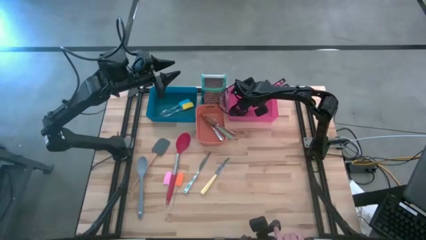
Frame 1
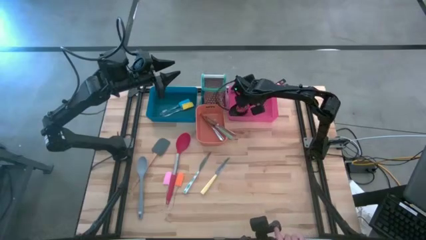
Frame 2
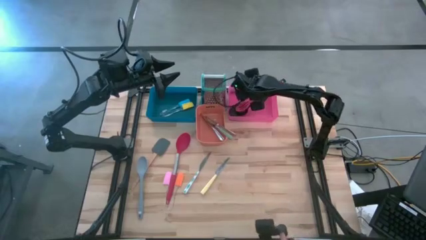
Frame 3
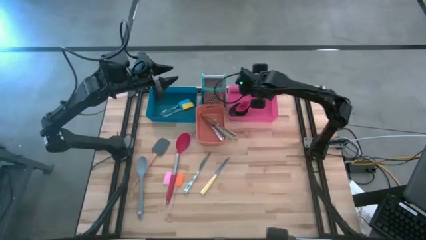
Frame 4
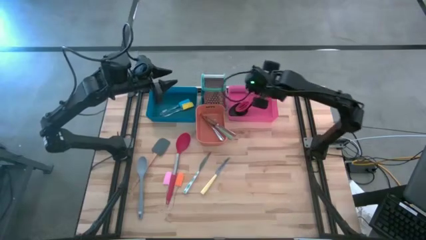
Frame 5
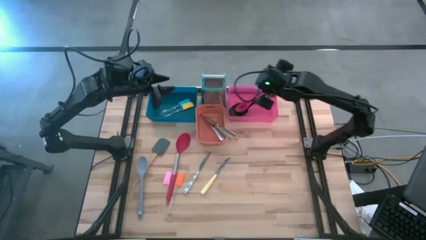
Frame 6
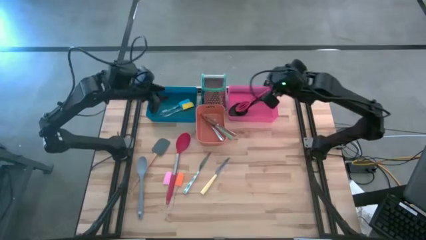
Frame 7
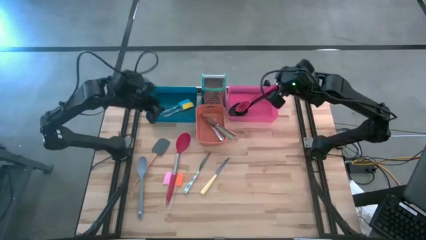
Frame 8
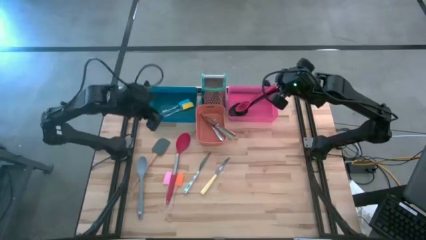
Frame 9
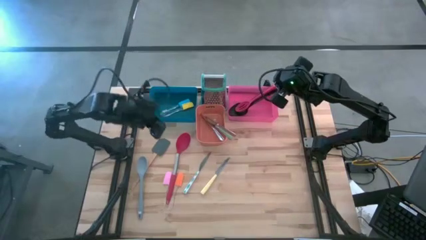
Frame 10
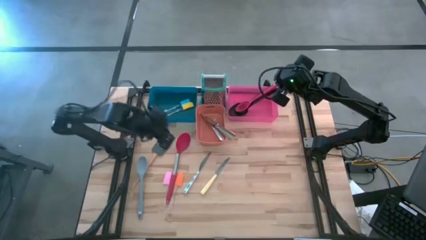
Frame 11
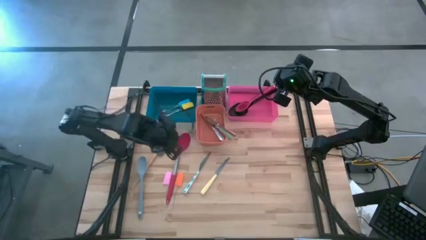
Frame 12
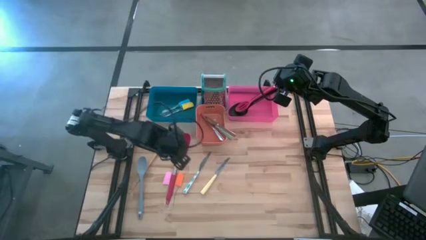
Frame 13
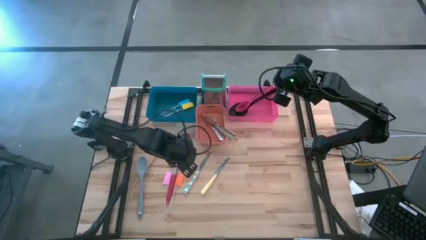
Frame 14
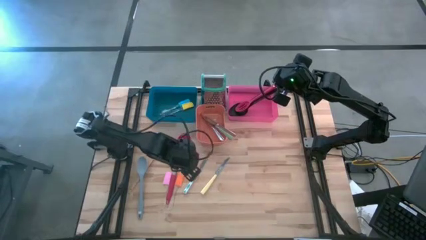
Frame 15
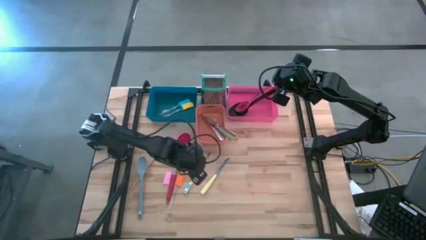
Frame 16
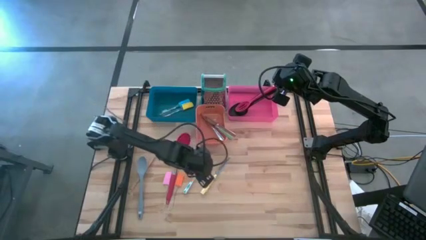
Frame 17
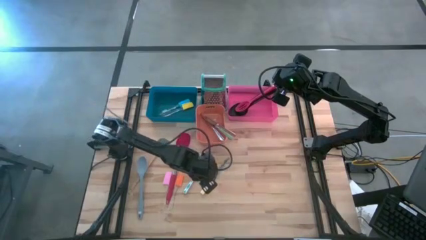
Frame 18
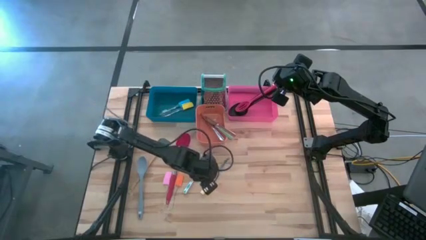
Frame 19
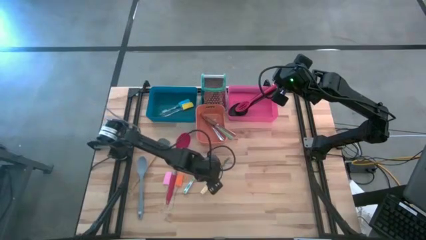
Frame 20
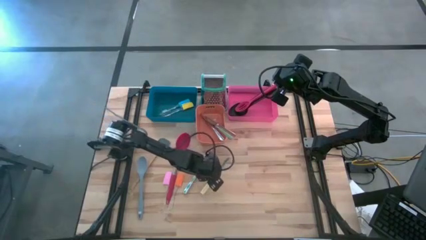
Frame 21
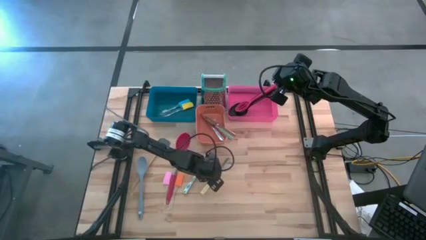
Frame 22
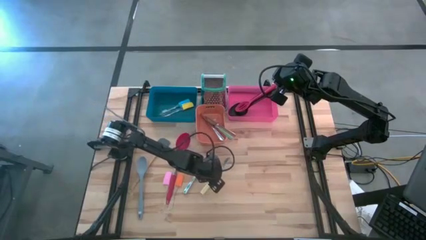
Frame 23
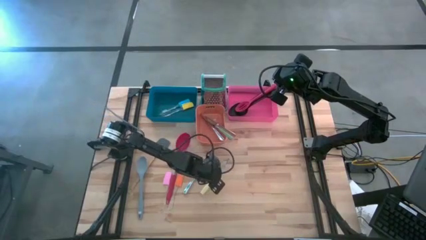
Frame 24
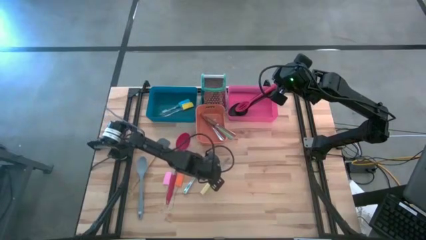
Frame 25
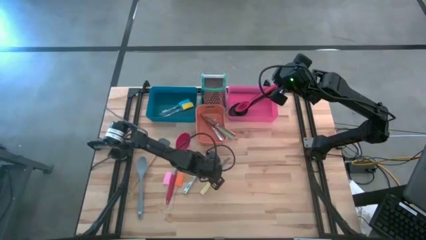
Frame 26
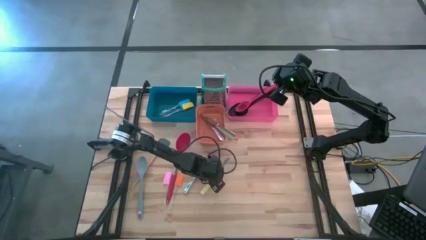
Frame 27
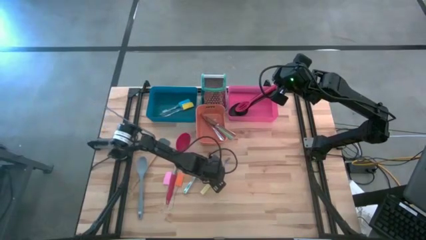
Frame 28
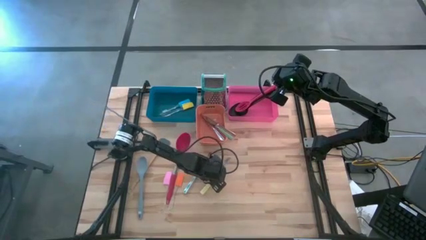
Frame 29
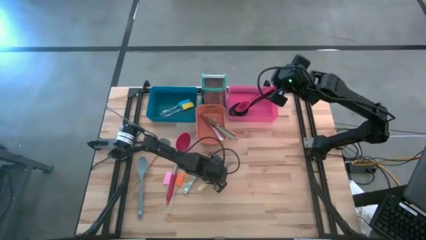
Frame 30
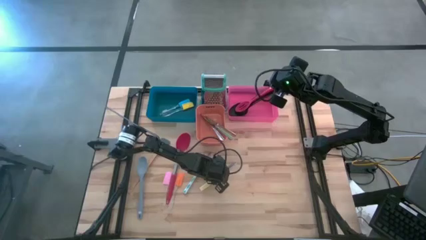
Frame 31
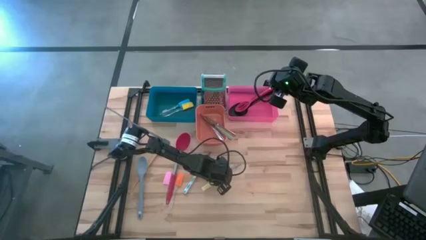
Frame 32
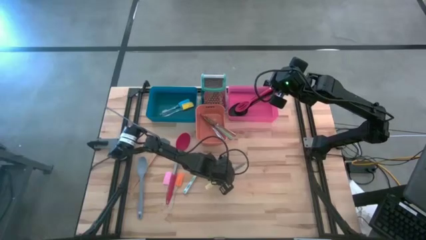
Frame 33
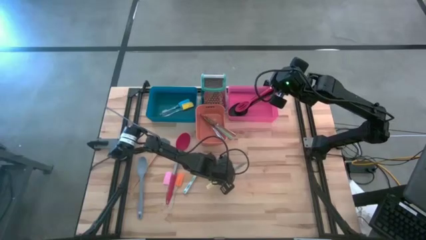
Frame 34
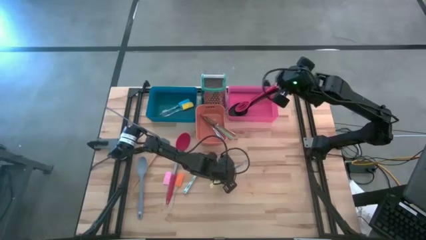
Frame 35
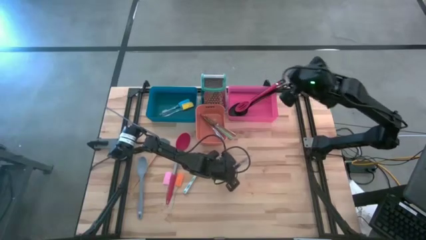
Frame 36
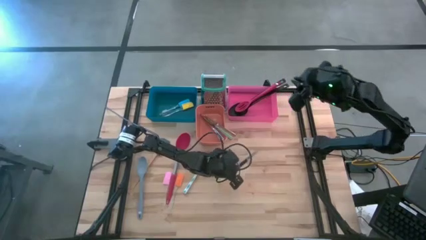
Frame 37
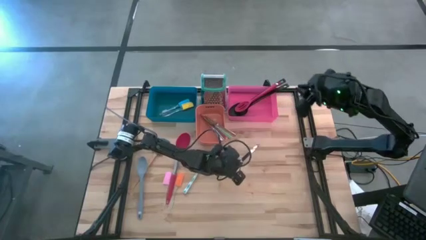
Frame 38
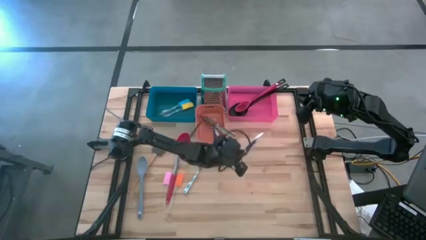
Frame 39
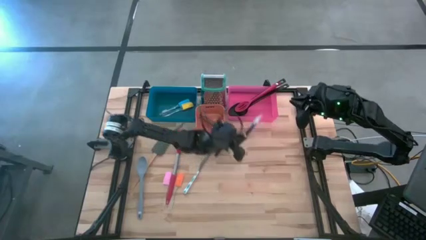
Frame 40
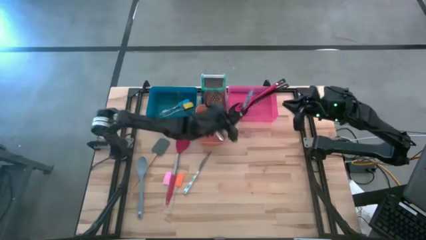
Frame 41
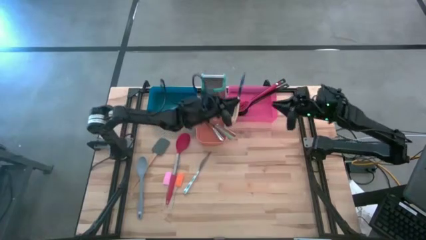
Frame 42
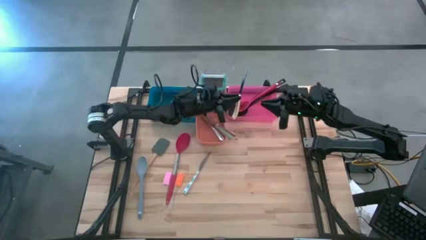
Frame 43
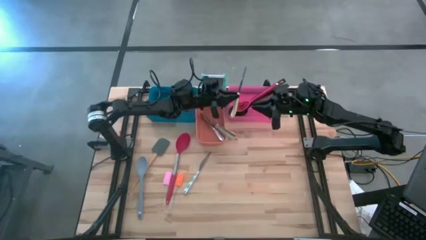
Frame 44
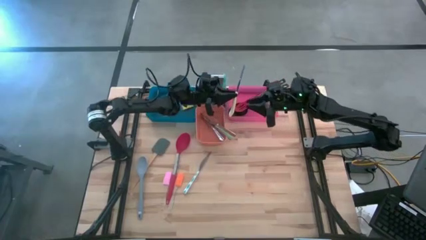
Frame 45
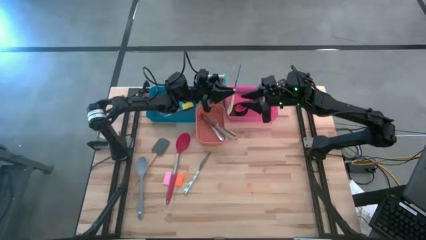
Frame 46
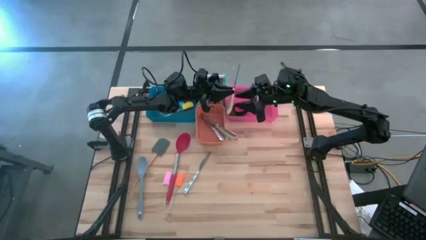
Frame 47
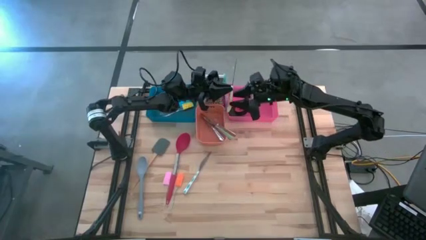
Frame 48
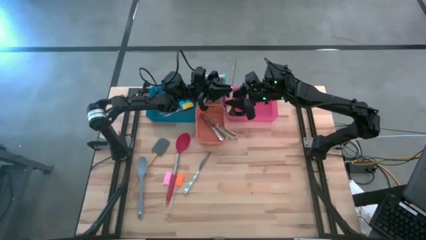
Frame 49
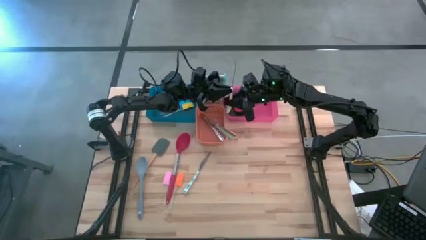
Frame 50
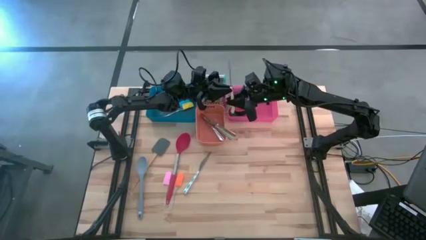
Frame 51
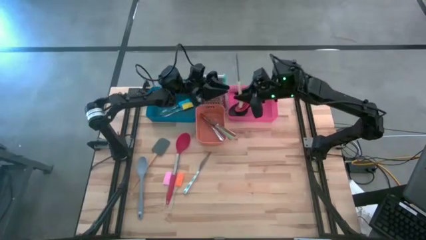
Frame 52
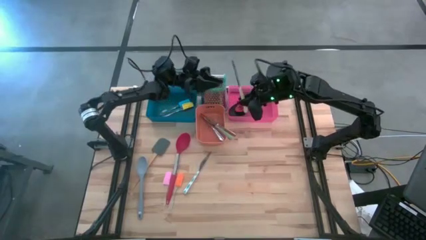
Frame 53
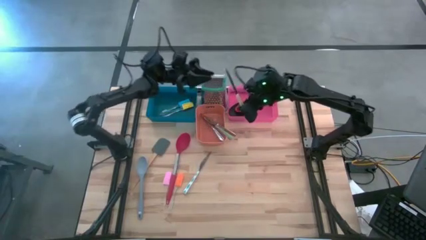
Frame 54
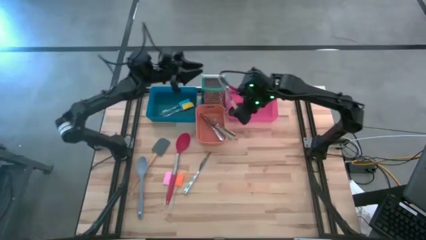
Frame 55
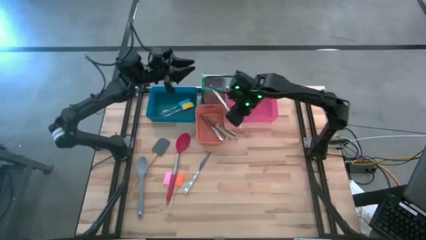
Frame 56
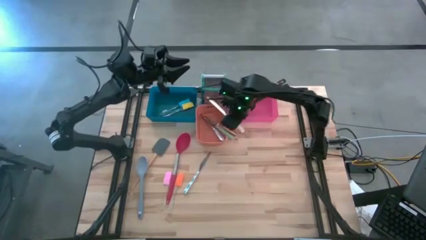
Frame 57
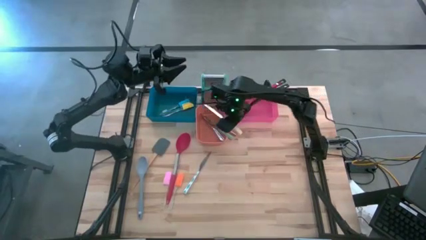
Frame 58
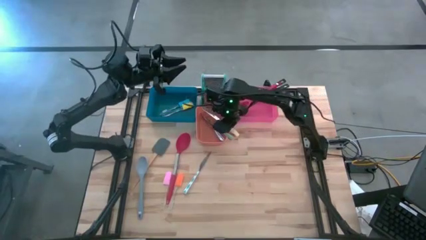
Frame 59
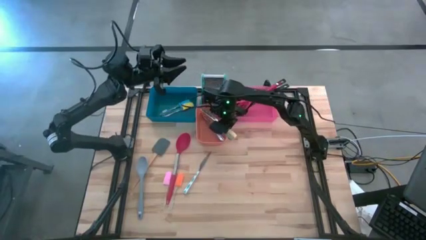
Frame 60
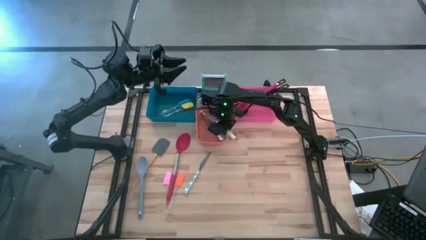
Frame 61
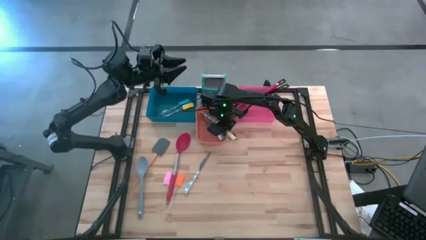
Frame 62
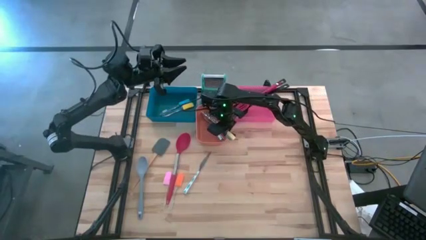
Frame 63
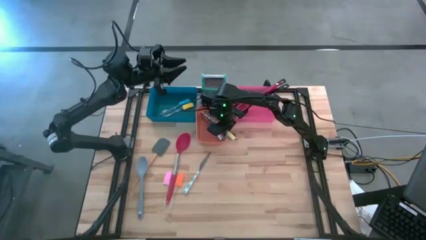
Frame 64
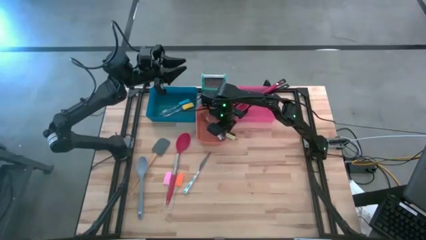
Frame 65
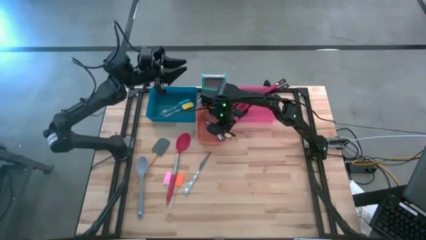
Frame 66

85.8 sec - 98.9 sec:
Task: Pick & Place Kitchen Items
Put the light green table knife into the orange bin
